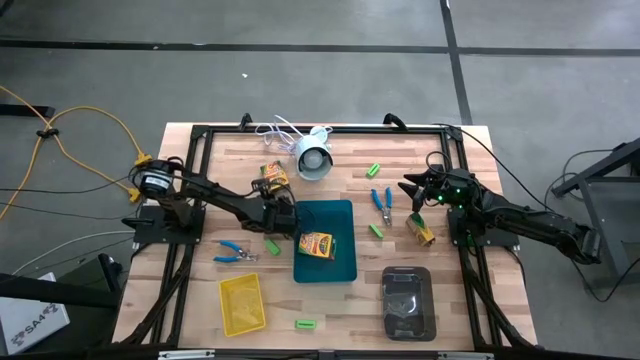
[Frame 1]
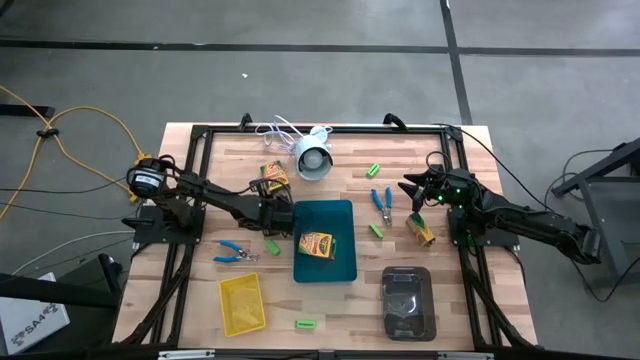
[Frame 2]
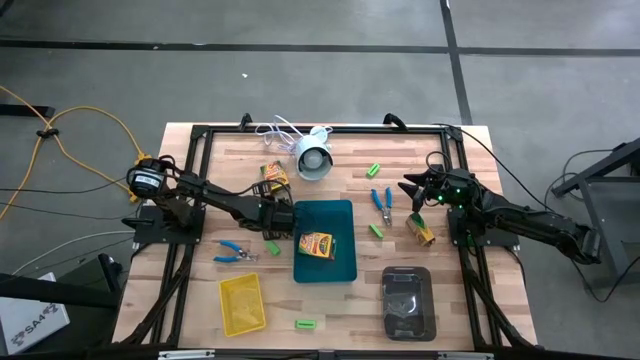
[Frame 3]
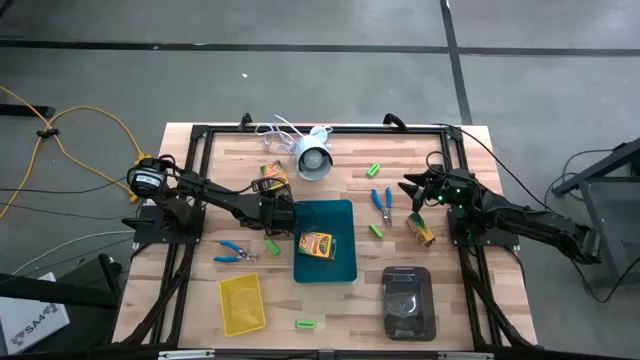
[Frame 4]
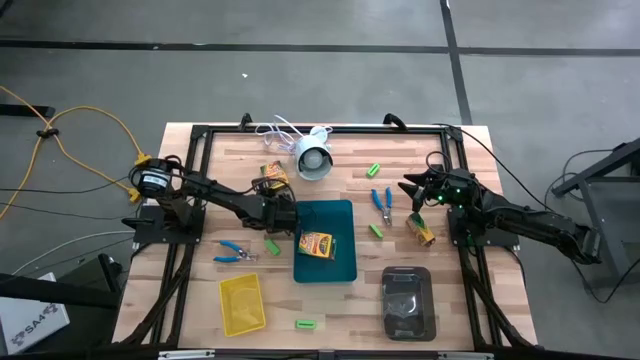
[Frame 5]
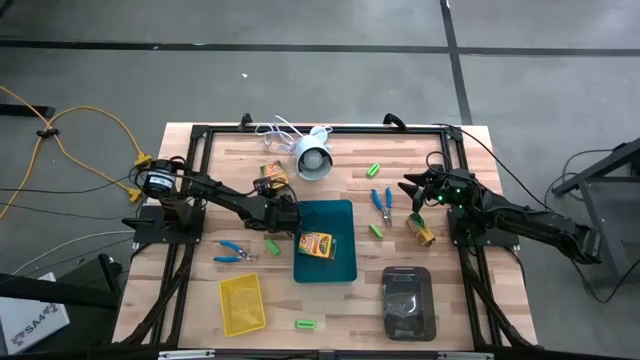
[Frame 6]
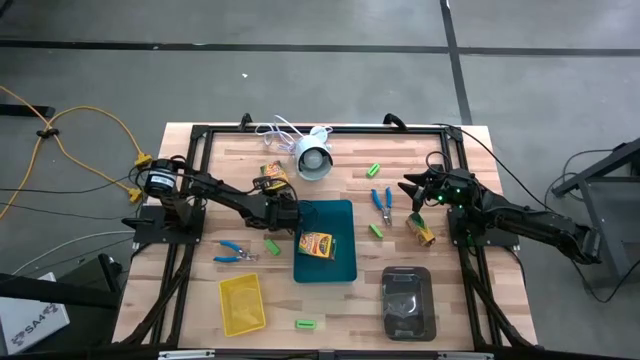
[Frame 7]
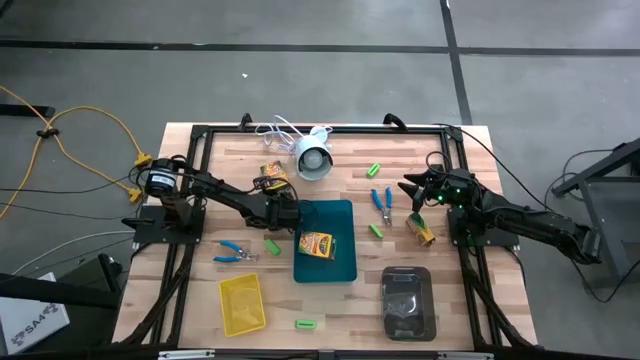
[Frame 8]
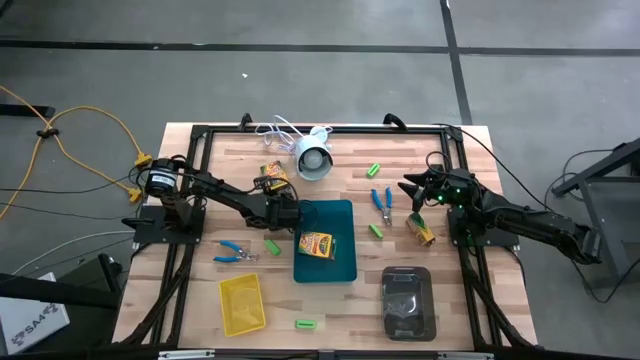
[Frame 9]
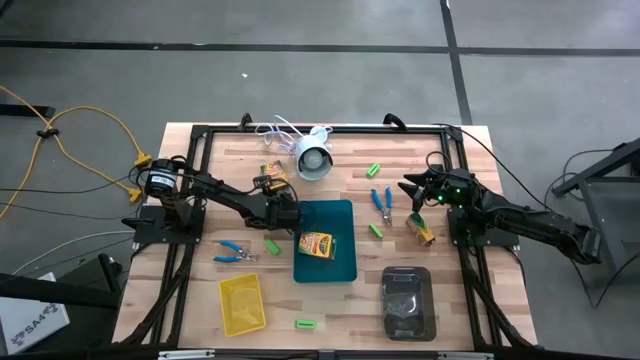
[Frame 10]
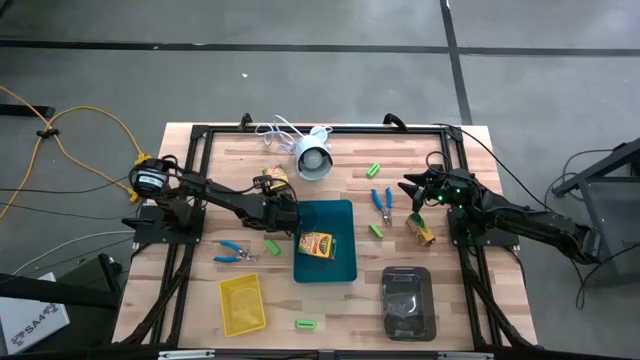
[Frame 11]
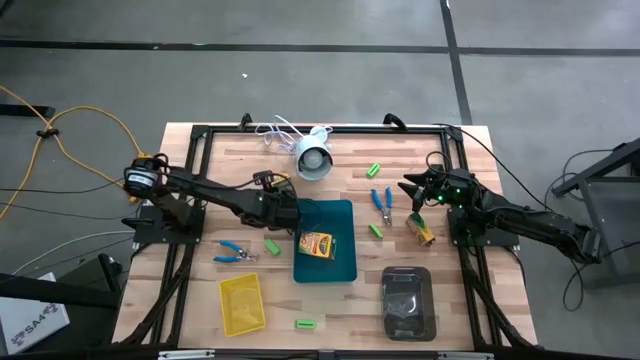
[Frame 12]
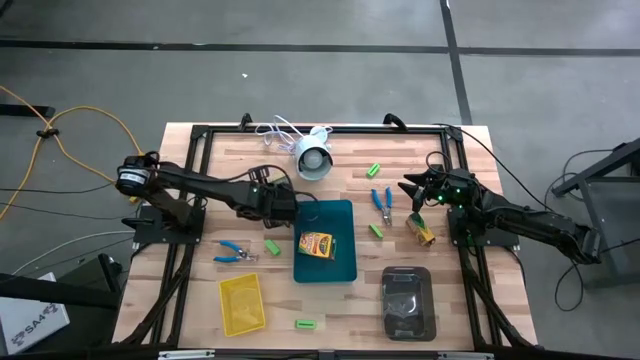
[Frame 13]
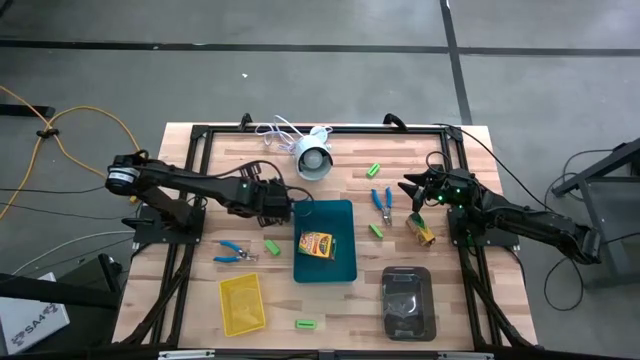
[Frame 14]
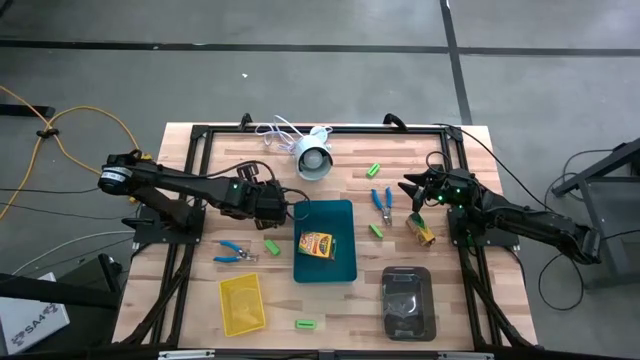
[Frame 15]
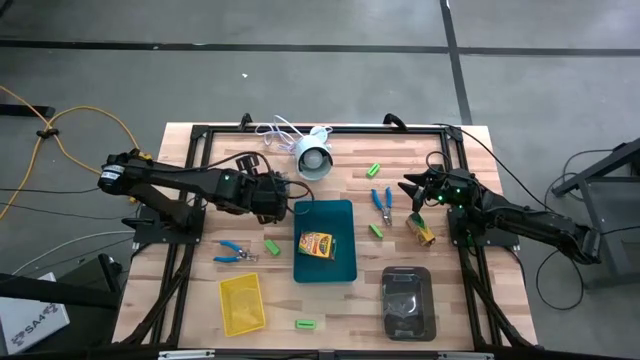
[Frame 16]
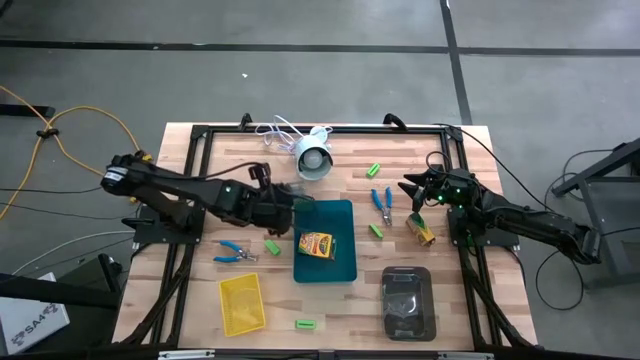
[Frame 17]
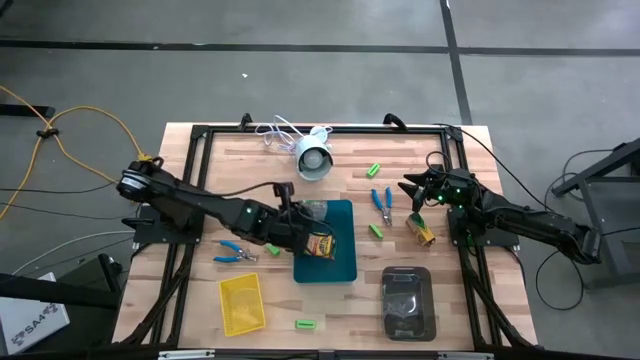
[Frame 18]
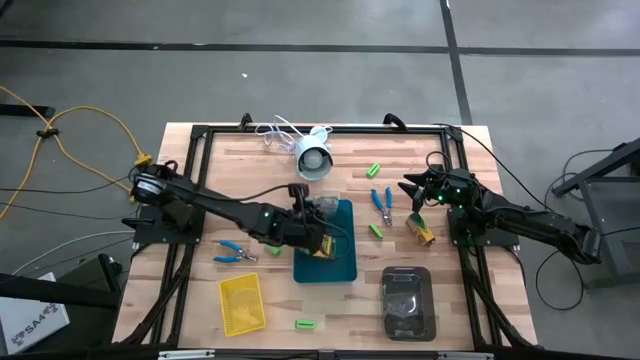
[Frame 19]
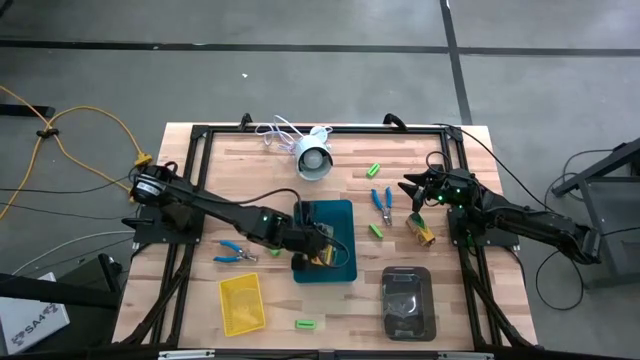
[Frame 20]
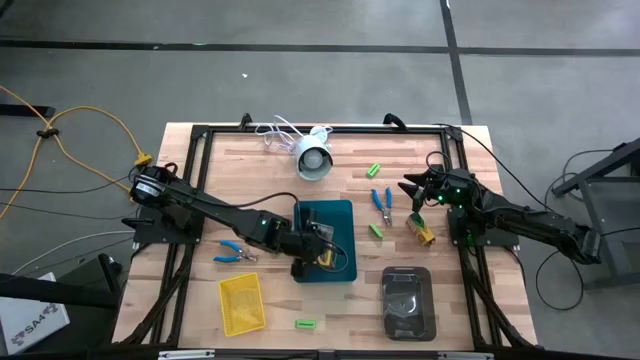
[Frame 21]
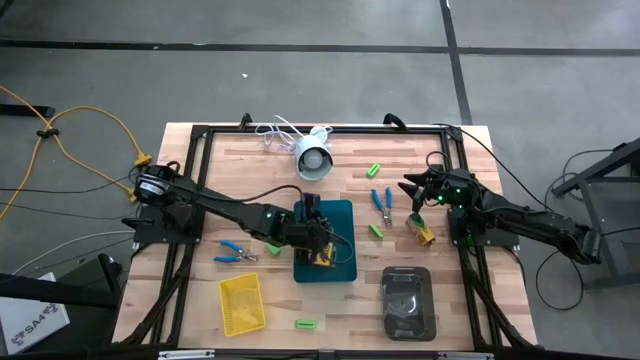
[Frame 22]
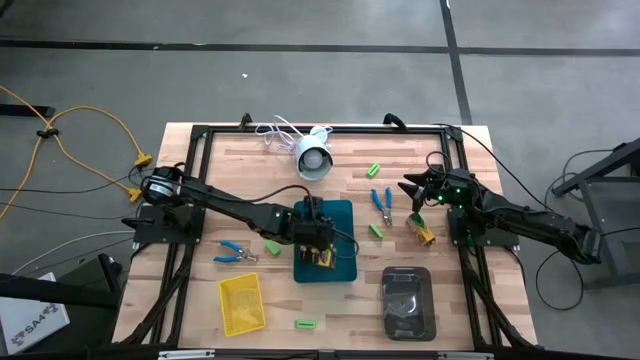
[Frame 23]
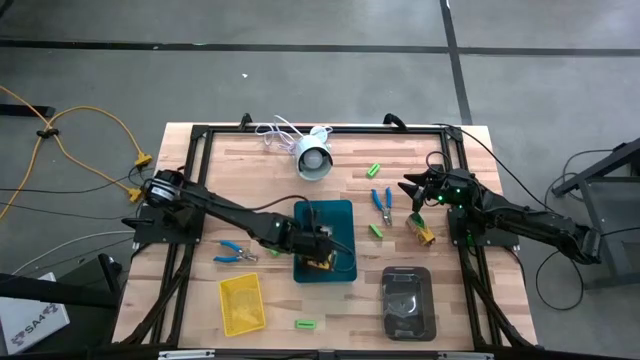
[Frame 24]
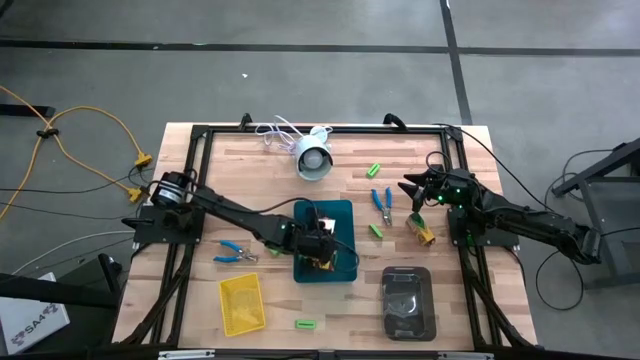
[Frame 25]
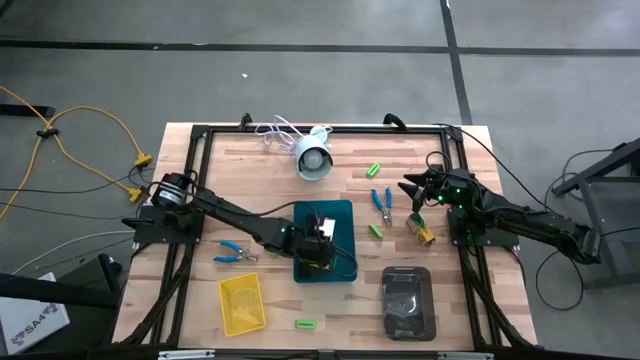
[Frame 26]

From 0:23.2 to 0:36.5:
Task: Pick & Place School Supplies
Put the yellow crayon box into the blue bin

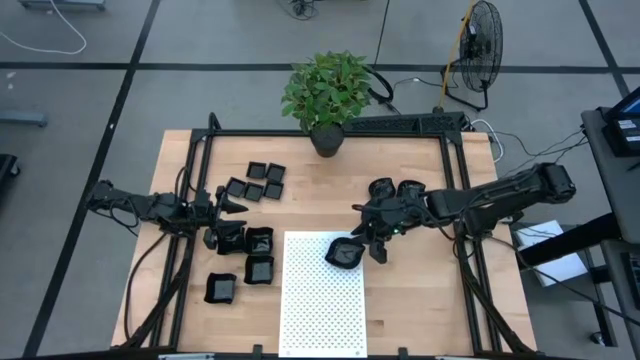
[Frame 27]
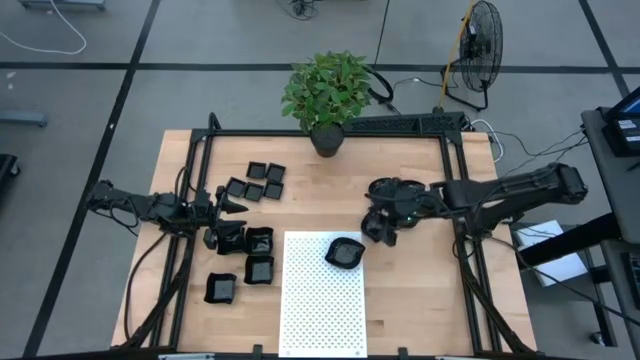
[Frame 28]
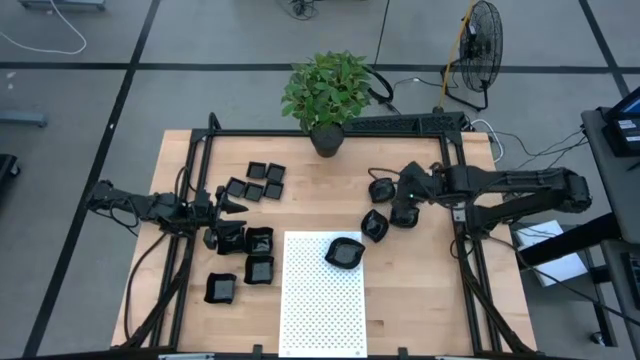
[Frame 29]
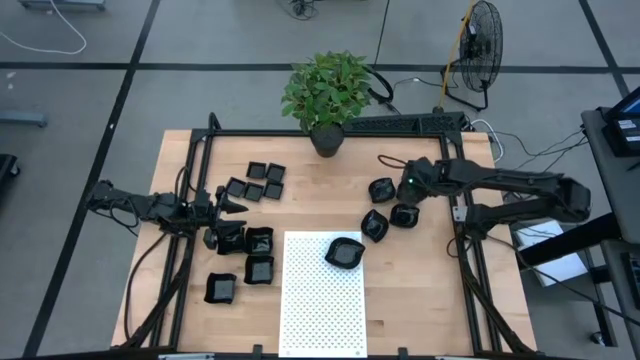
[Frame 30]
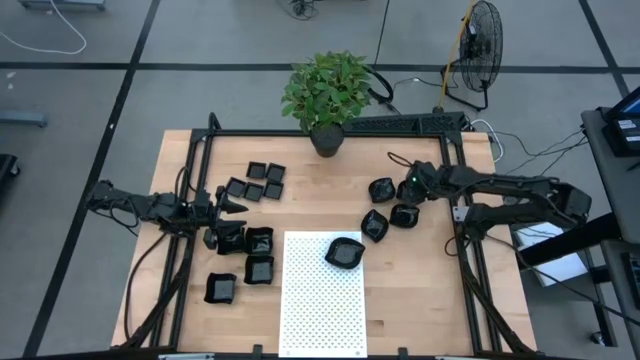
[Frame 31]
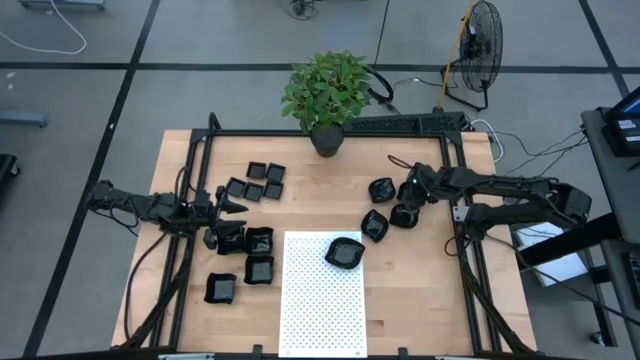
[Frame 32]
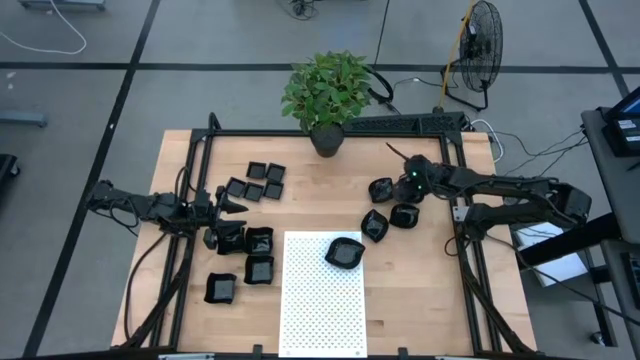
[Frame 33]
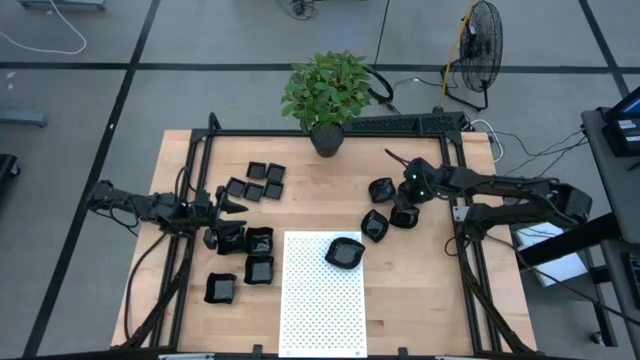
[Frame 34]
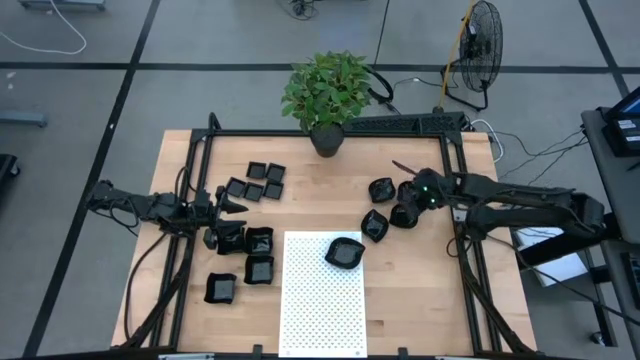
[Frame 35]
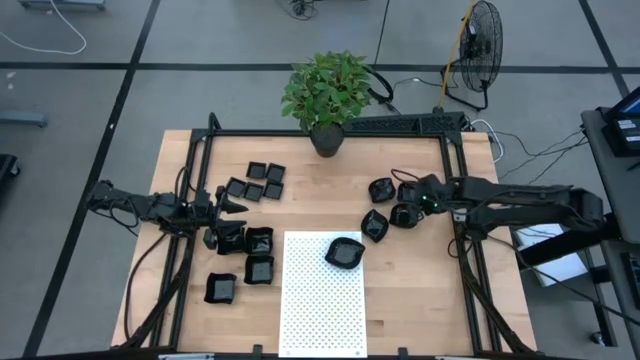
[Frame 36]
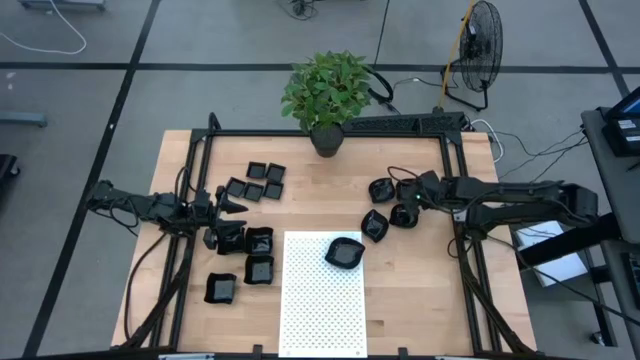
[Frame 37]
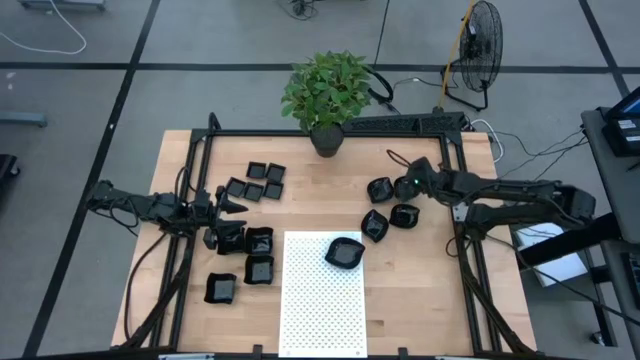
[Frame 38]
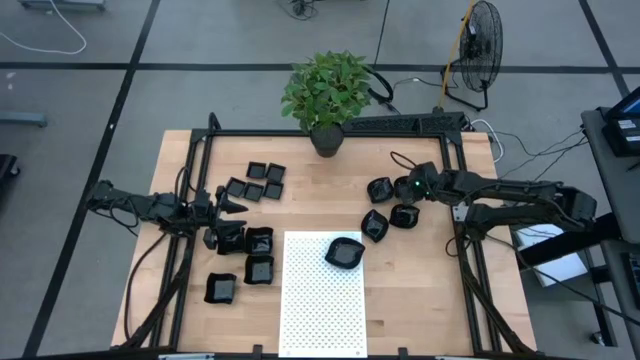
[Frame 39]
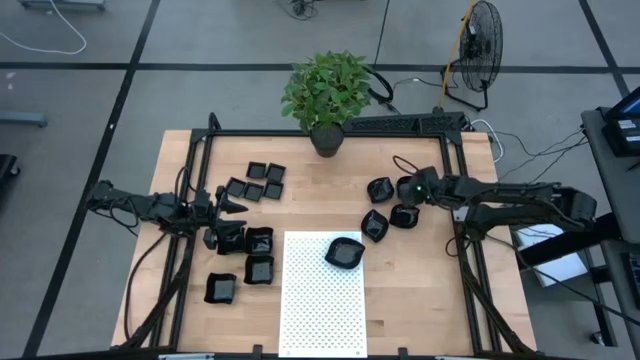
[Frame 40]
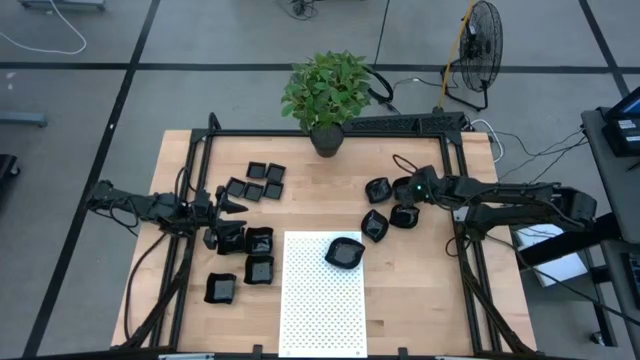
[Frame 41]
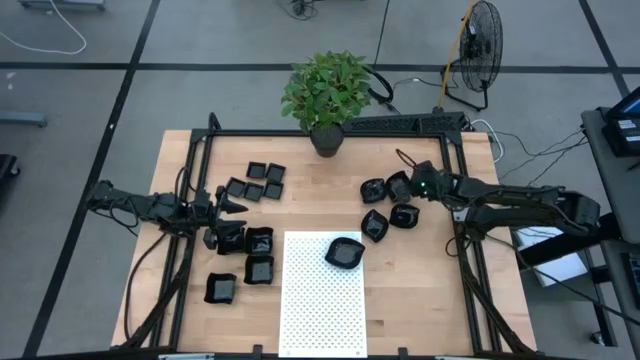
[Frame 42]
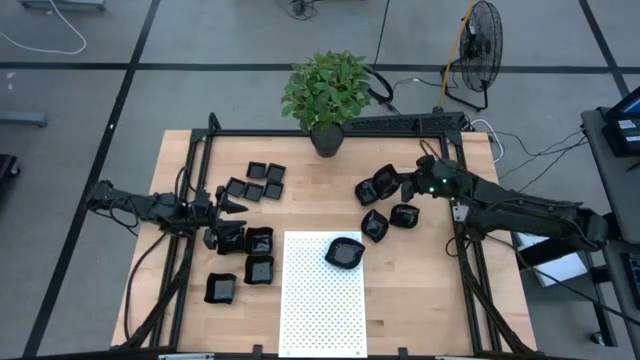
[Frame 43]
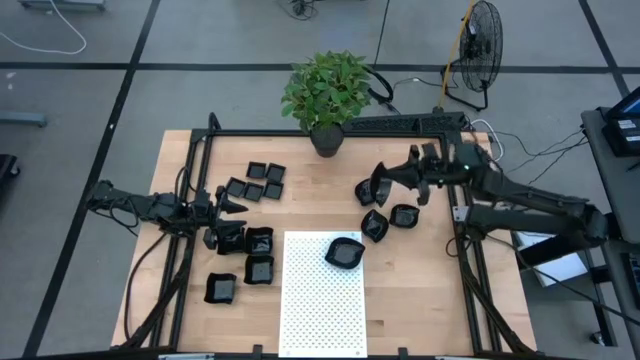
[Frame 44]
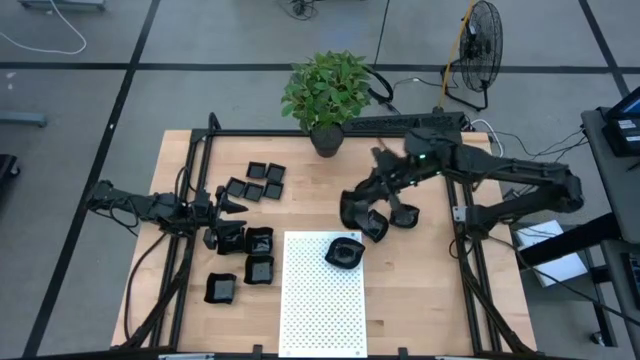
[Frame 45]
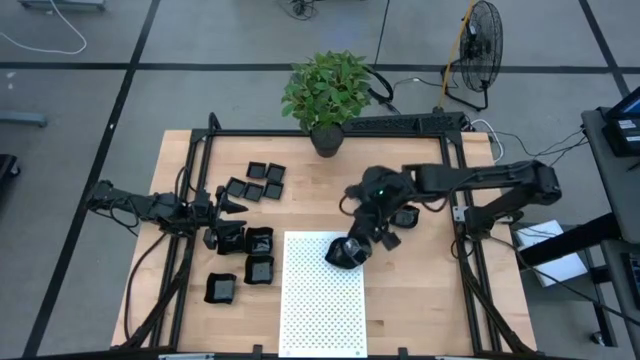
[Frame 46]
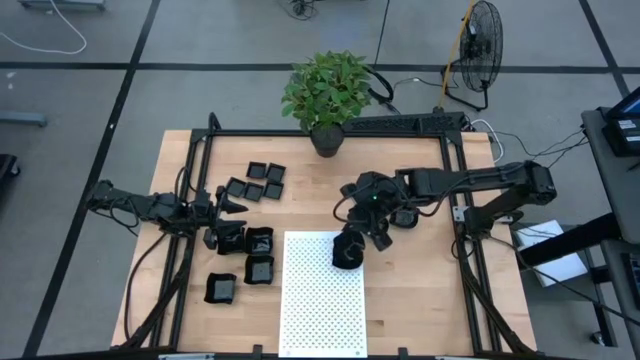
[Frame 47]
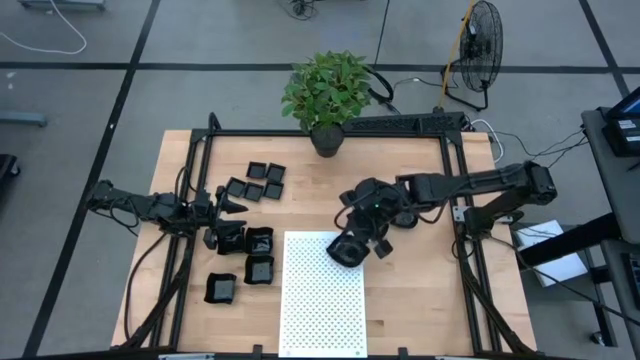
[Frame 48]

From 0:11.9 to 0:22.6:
Task: Pick & Place Mini shaped plates
Stack the leaf shaped plate on top of the leaf shaped plate on the shelf
